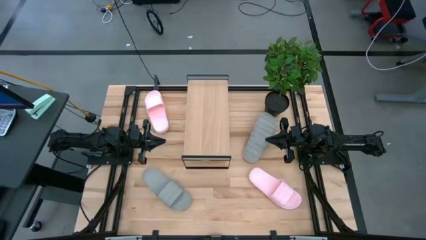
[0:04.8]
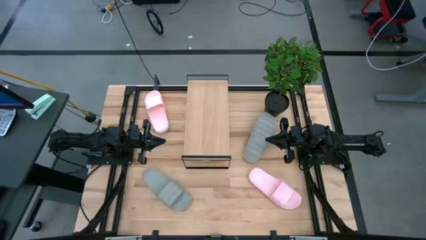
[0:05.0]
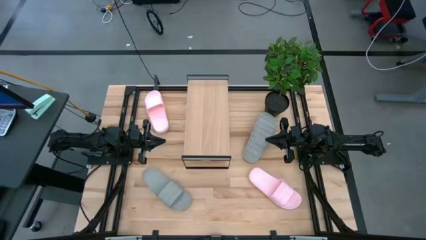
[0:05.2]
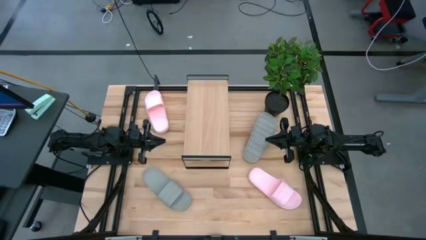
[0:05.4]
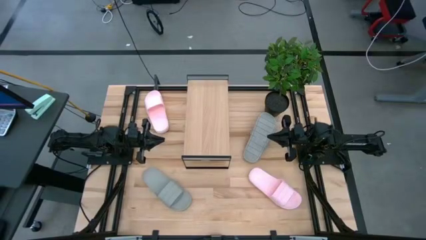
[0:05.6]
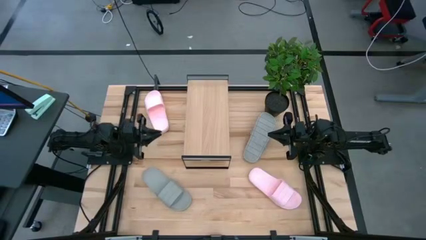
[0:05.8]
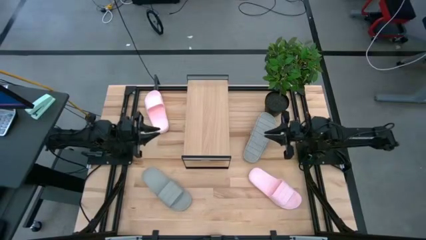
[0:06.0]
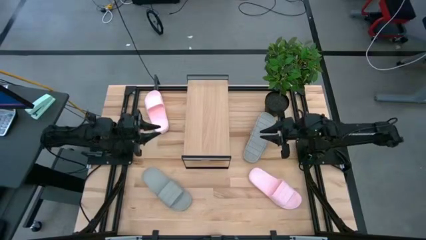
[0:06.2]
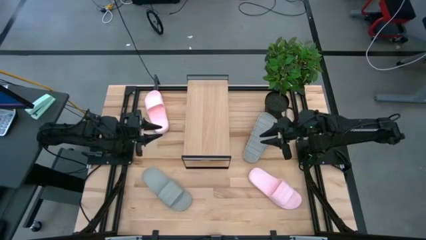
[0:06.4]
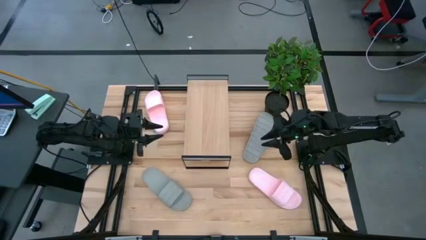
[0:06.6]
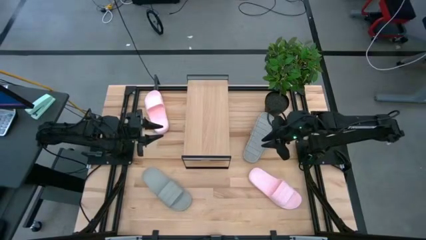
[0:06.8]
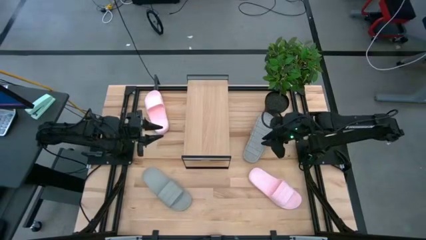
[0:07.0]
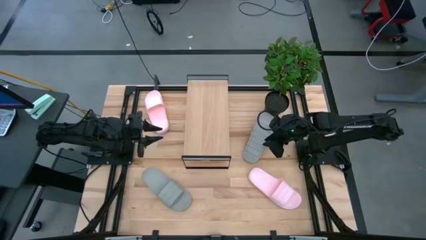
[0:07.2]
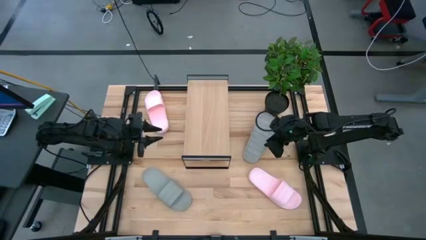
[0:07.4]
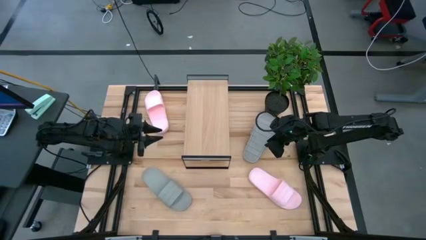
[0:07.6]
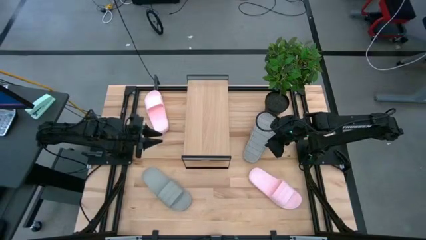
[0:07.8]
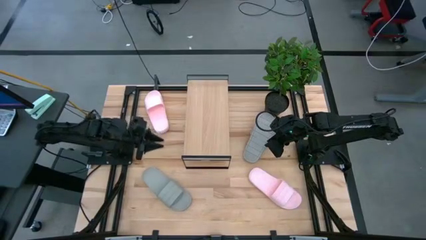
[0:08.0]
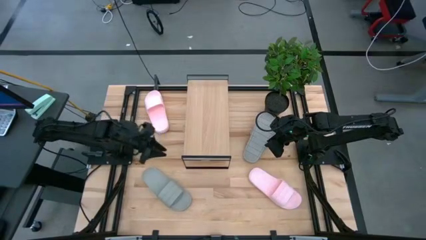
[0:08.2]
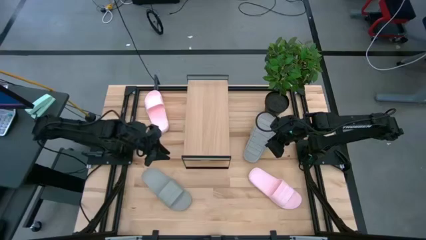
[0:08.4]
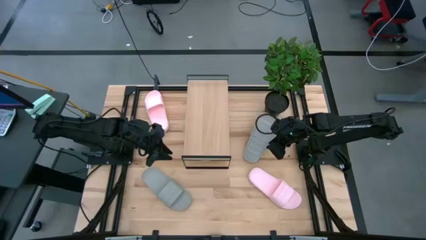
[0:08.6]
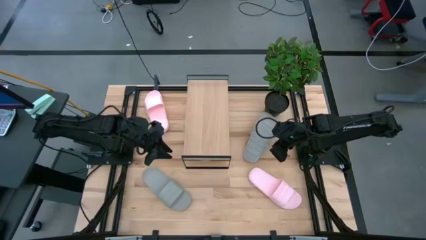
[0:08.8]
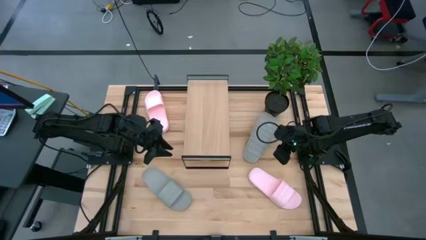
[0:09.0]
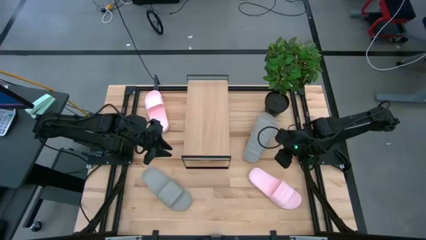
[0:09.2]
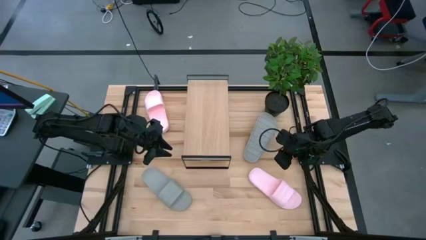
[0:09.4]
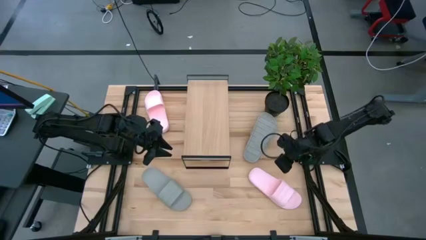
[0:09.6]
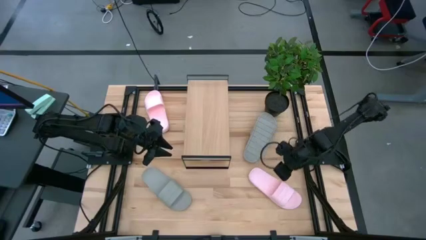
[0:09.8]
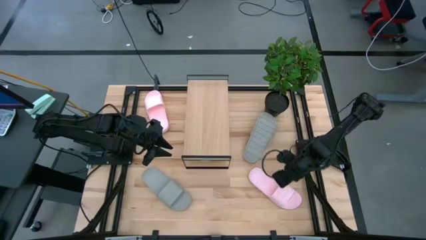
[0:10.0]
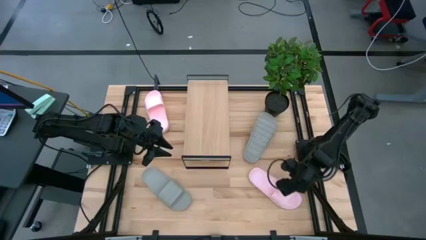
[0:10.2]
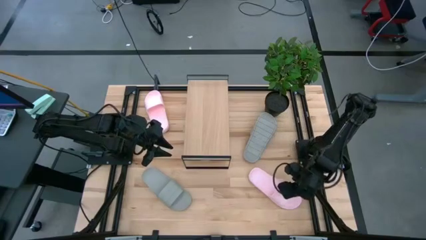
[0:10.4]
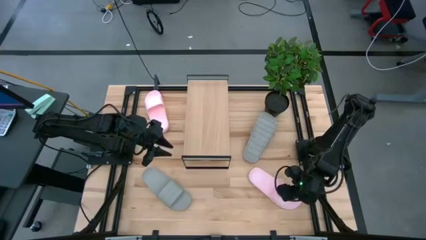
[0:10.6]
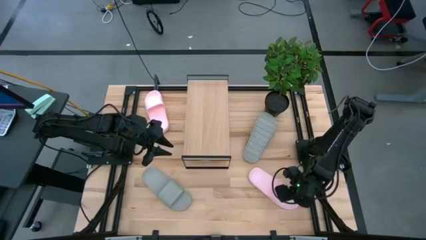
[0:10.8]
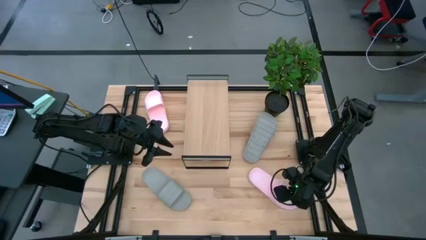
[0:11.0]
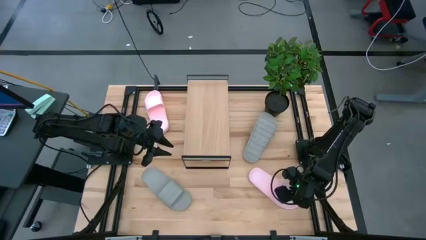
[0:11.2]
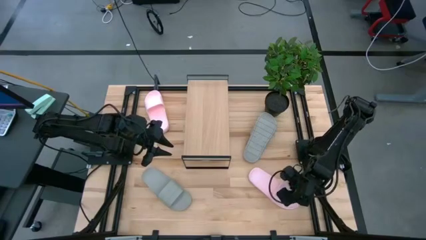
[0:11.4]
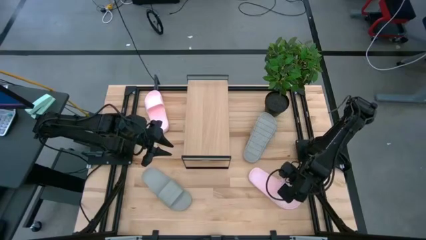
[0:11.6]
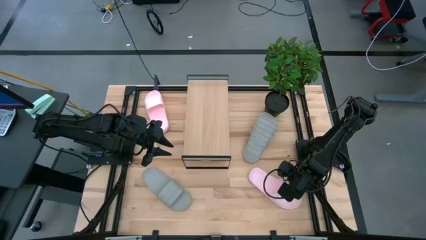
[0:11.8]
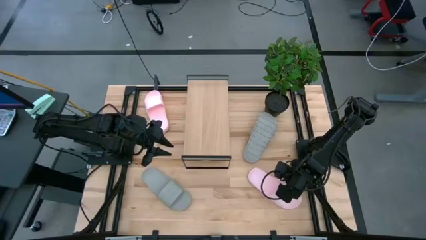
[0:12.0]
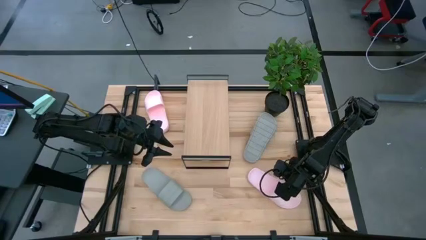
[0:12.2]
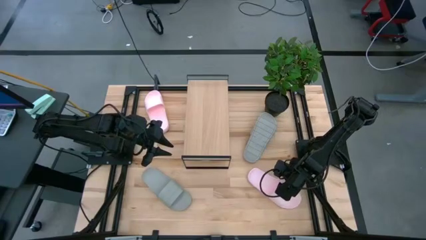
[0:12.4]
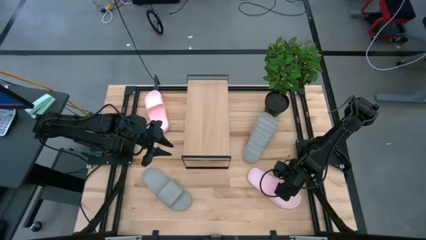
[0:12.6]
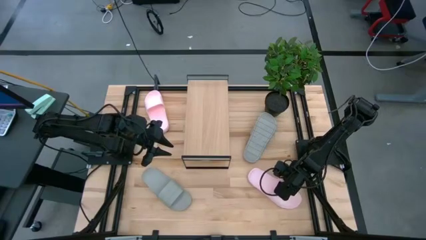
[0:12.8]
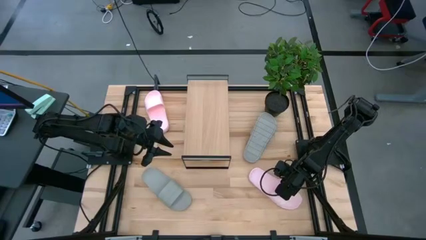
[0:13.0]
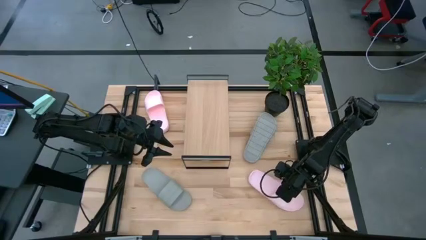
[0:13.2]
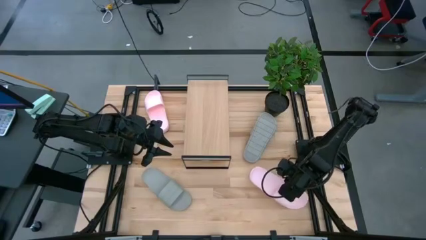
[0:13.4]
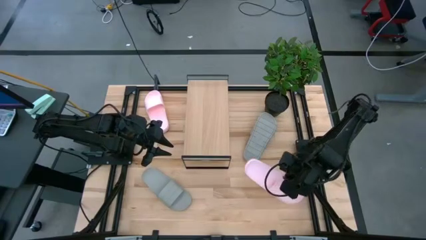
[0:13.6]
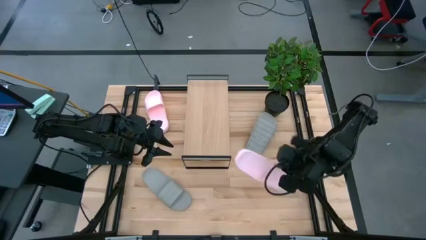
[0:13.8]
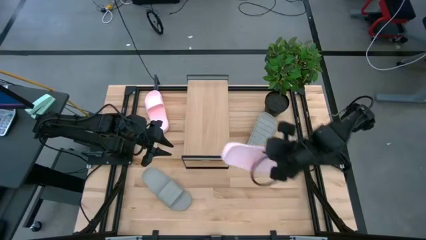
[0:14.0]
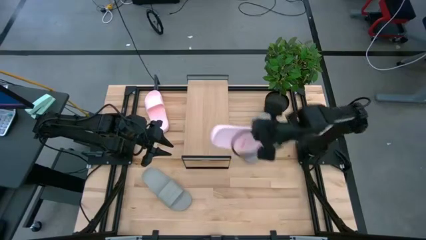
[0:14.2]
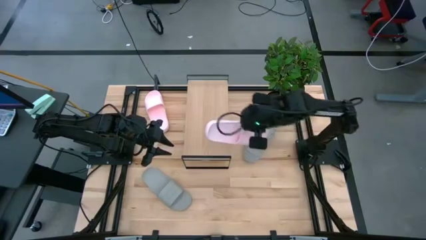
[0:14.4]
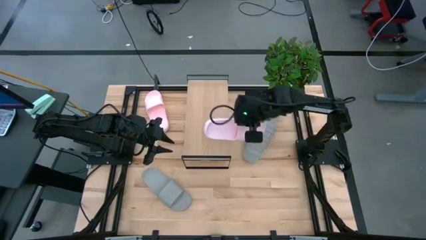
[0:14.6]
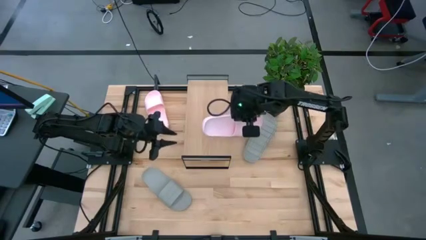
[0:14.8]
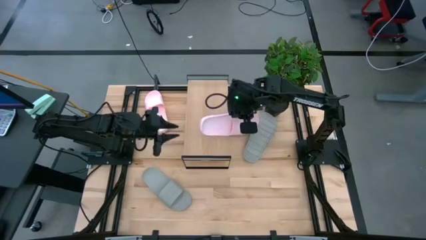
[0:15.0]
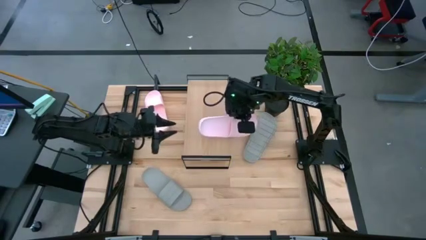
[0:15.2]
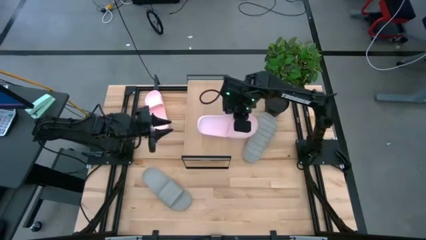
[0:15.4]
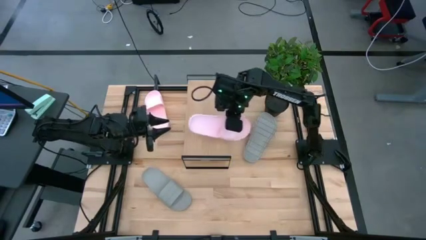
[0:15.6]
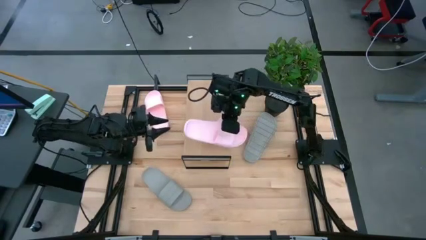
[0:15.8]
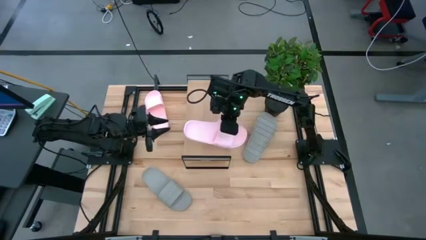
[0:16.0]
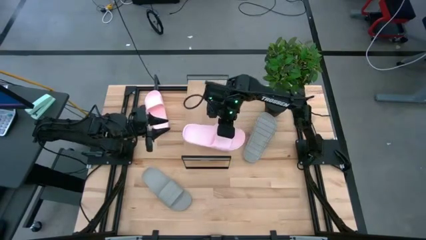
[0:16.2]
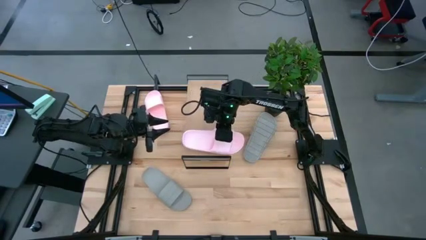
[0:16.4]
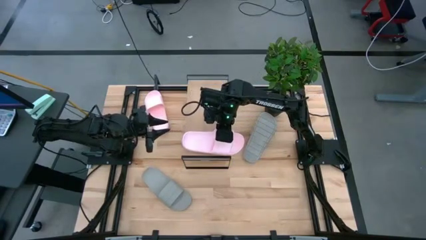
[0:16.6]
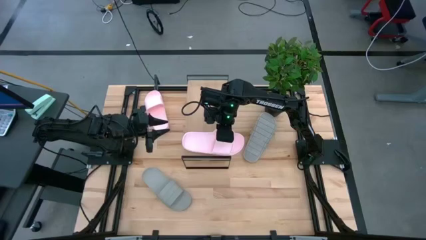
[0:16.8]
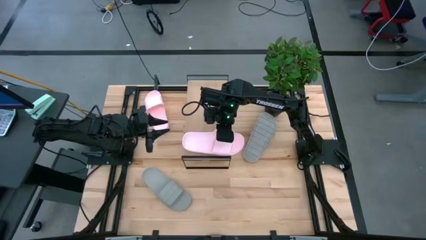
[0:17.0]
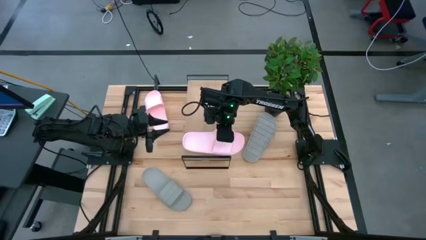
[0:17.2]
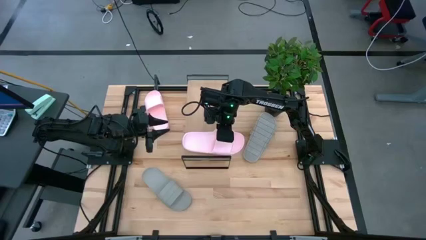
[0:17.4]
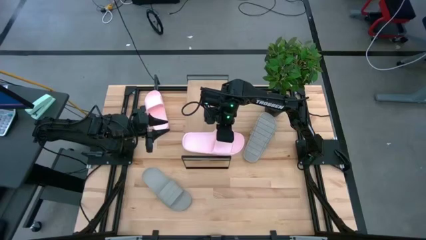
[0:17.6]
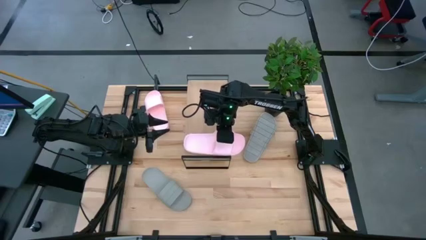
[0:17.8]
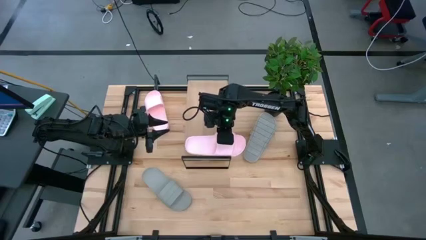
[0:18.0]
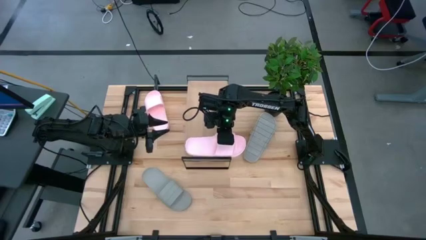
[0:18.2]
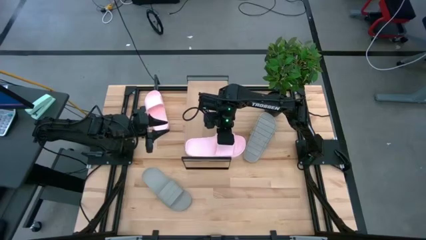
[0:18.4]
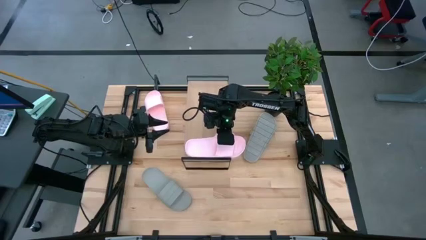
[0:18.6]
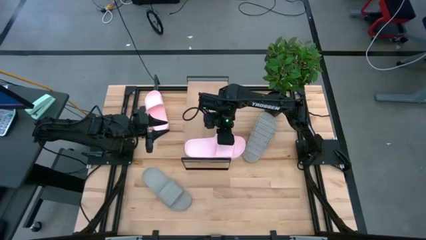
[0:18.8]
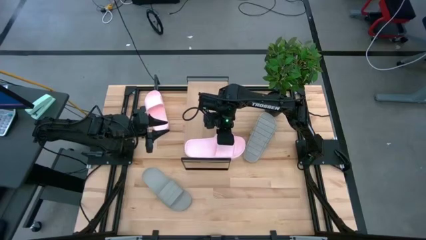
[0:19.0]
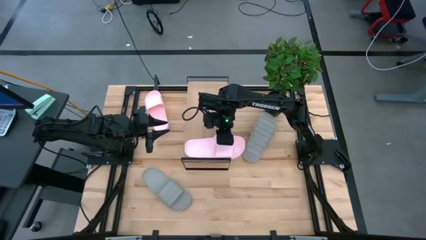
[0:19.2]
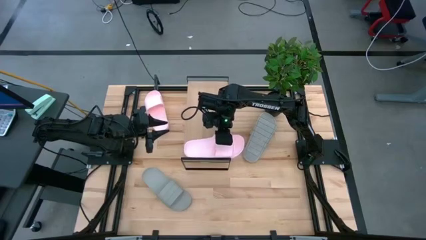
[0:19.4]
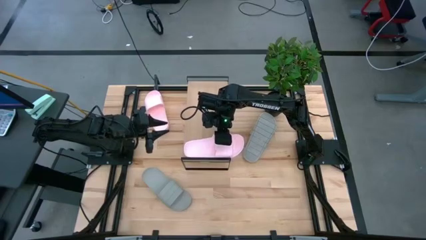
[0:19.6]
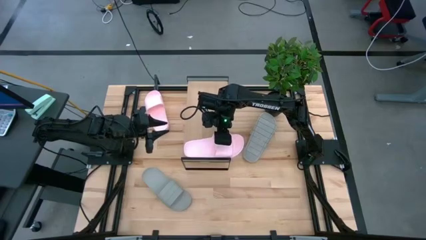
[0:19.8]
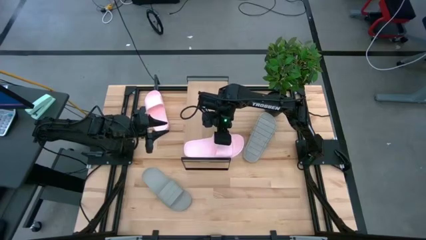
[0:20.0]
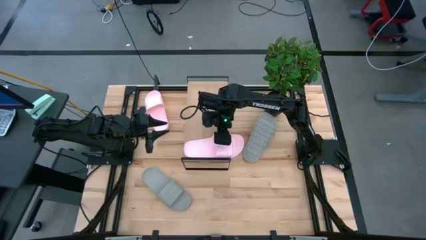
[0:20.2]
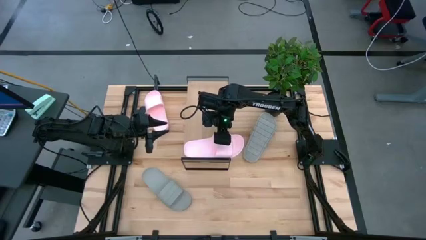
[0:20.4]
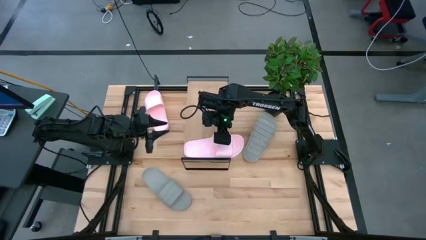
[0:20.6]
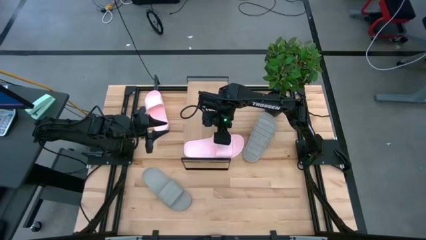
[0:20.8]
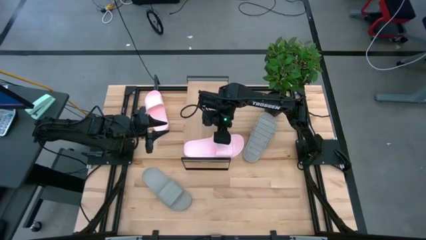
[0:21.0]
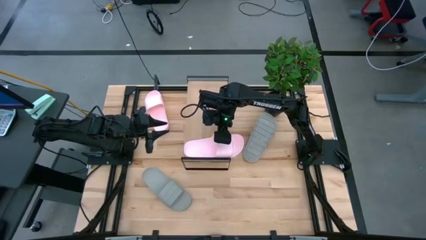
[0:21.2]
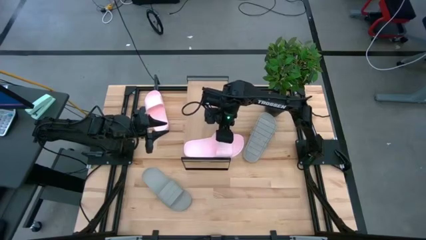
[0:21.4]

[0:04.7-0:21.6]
Task: Pick and place slides into the shelf
Put the bottom pink slides on top of the shelf
